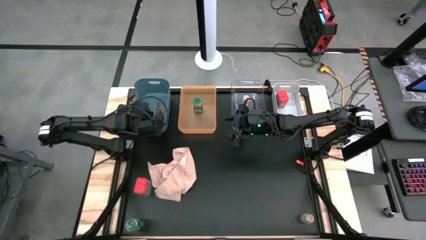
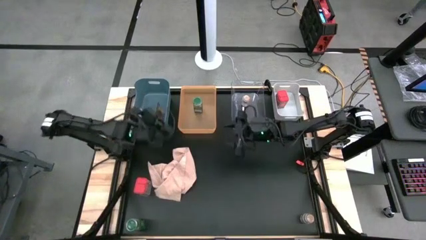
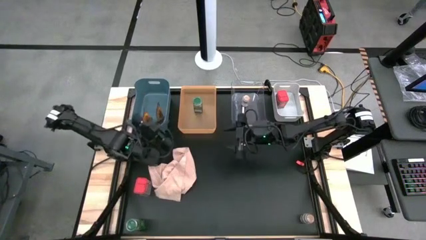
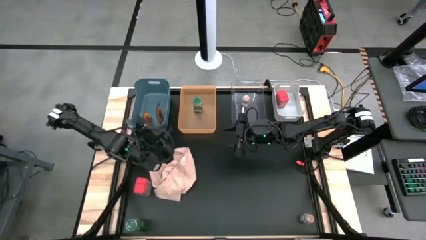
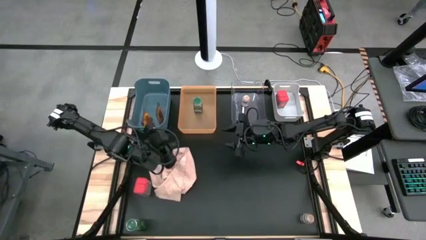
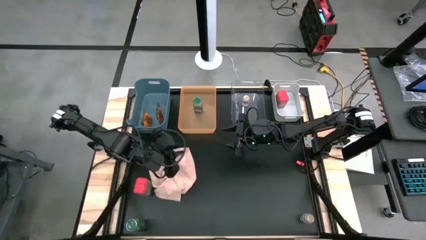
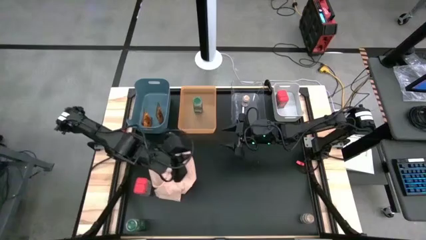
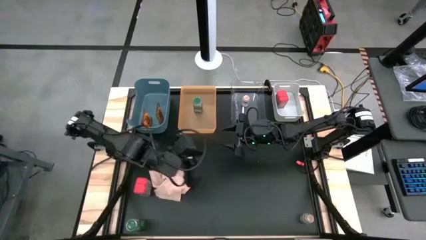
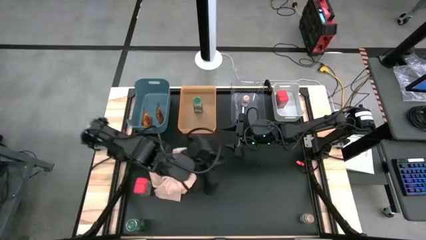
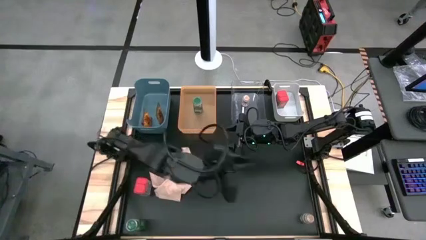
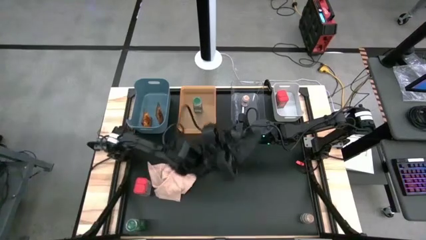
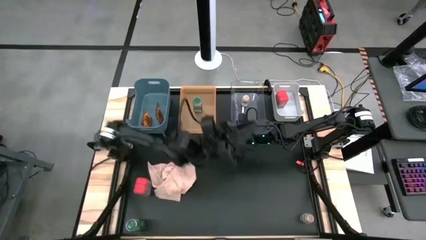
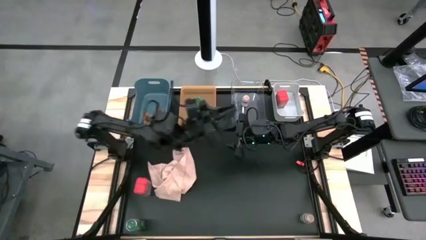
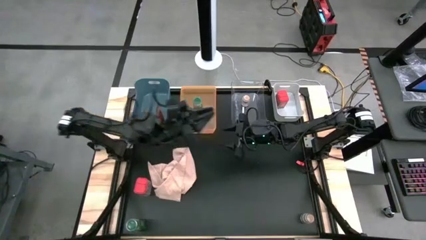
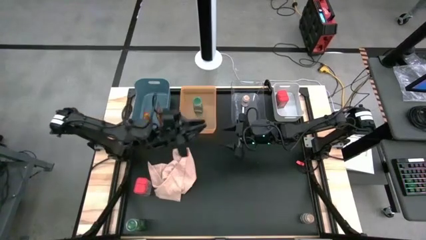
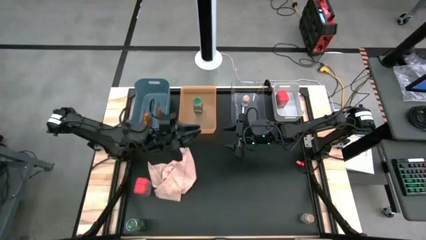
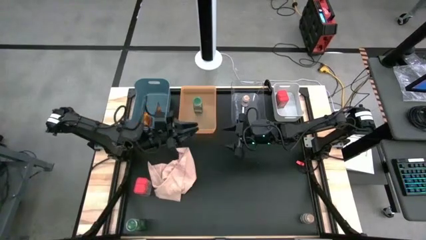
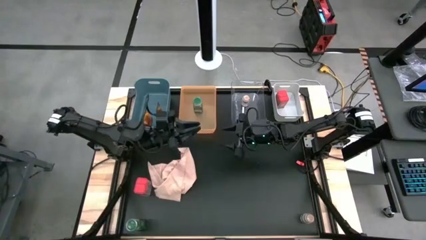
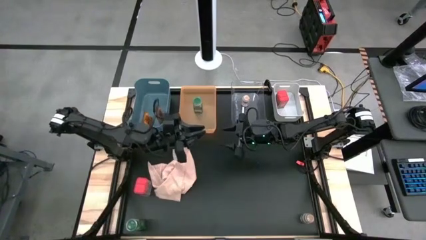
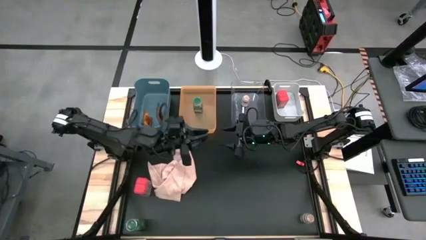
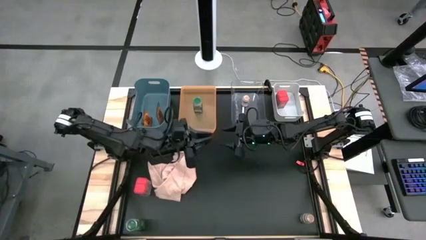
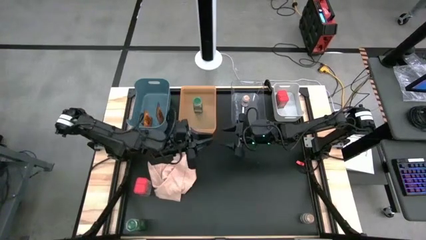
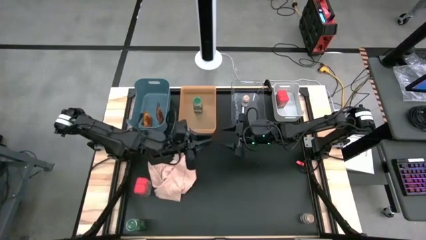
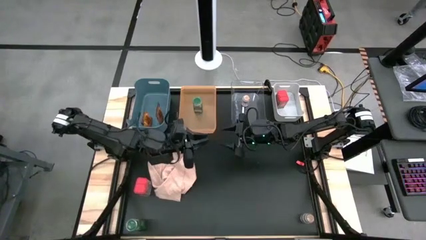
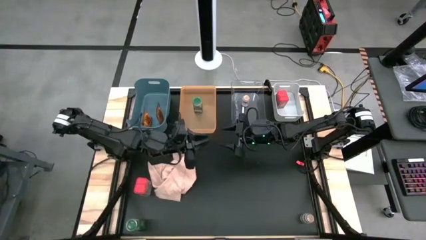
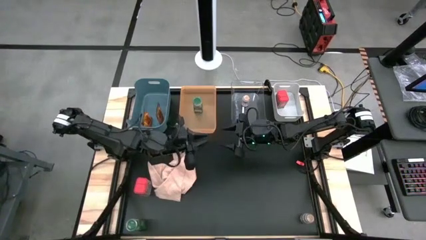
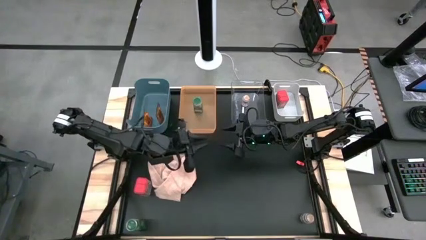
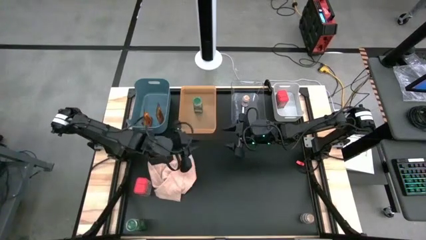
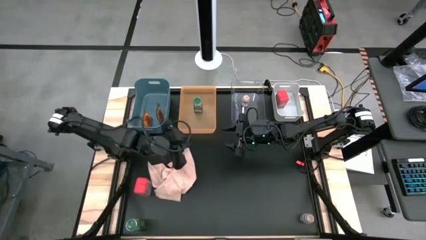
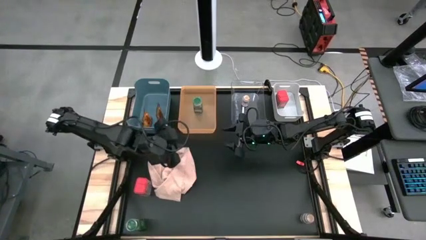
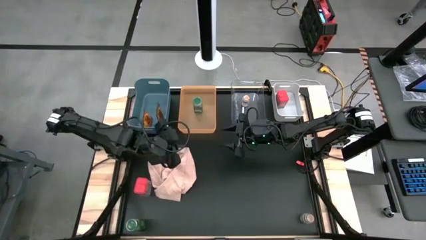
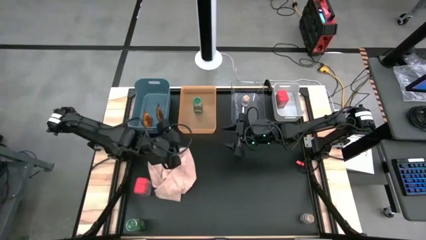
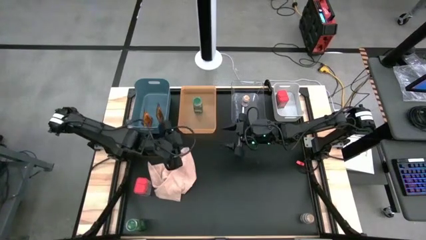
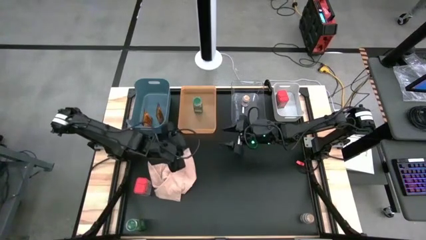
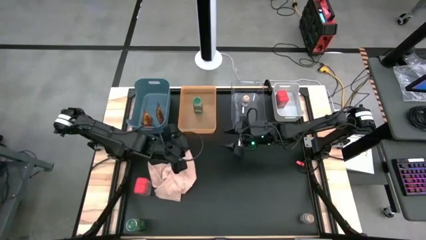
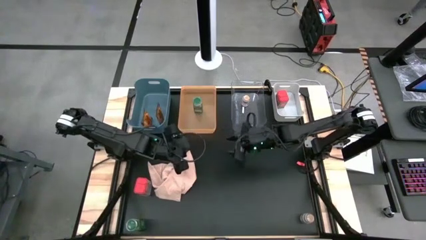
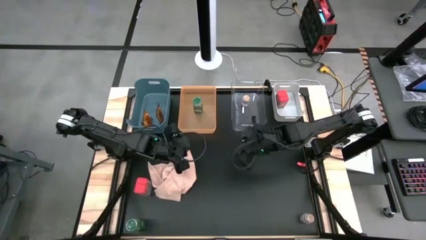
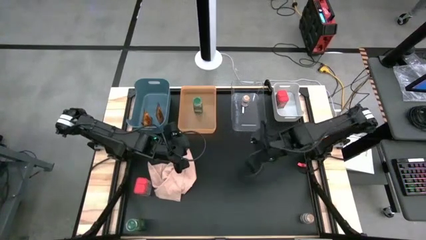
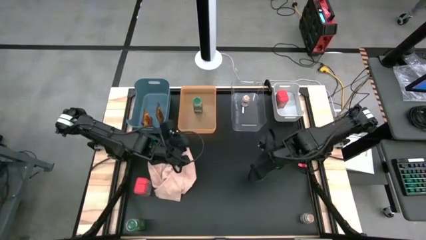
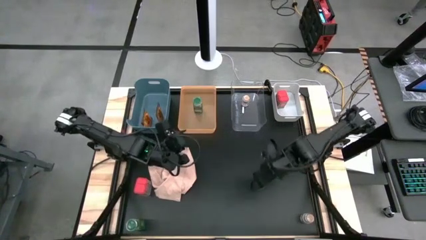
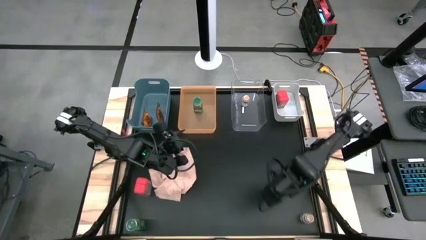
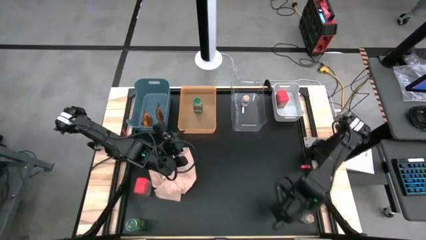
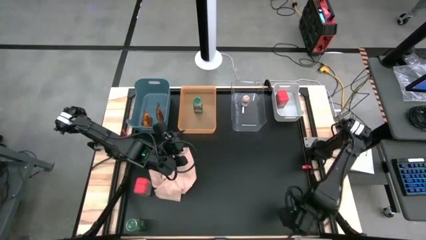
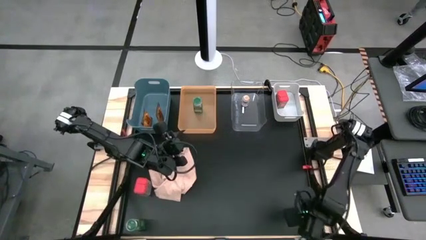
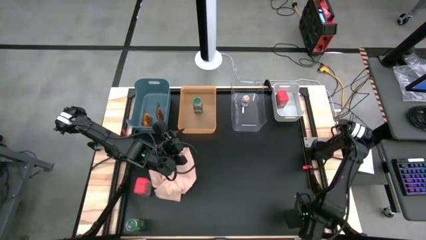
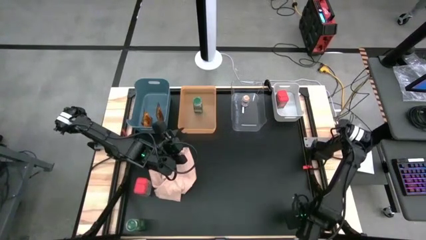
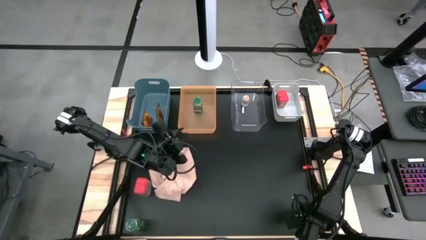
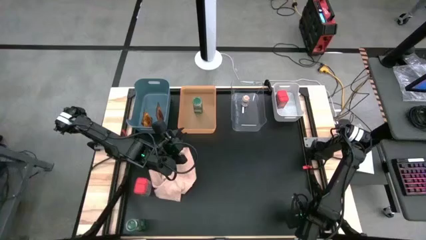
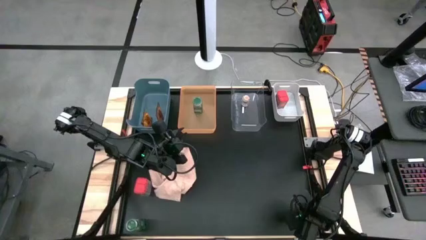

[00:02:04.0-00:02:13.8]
Task: Sort spices by type
Put the brown seasoning bottle into the transparent bin

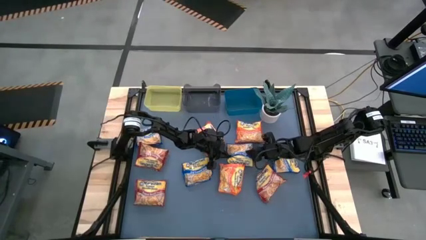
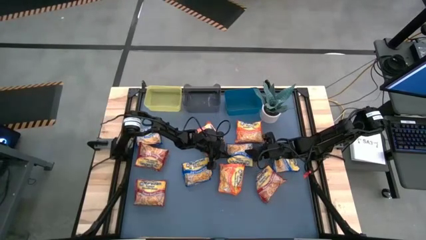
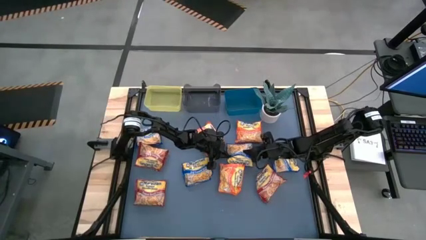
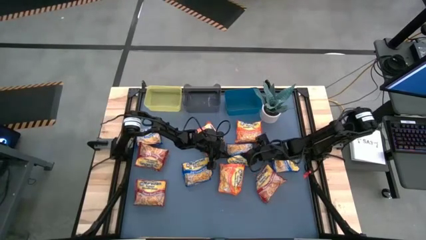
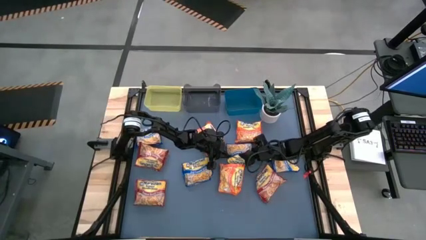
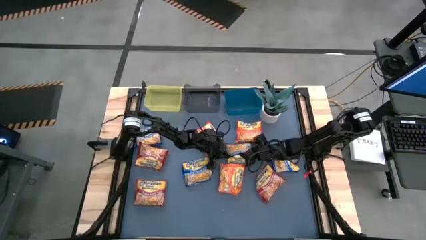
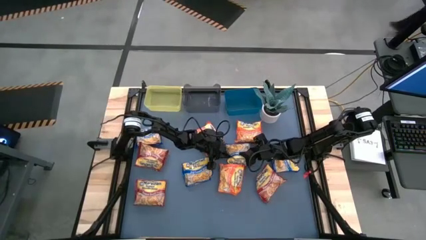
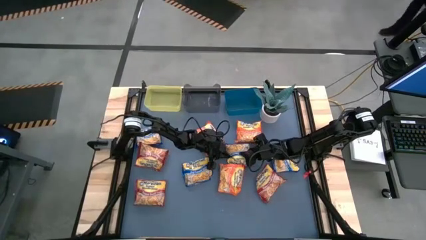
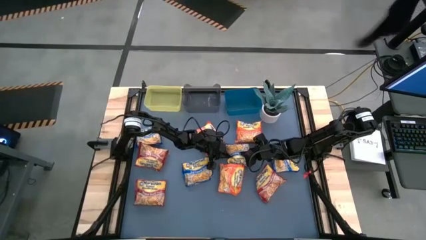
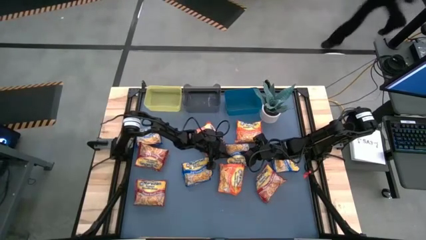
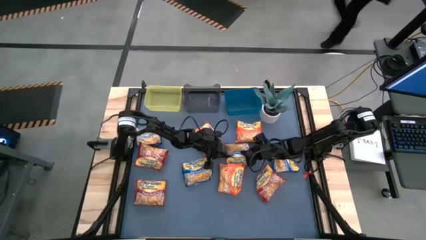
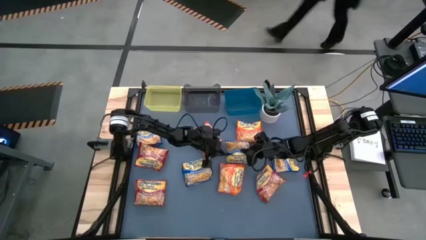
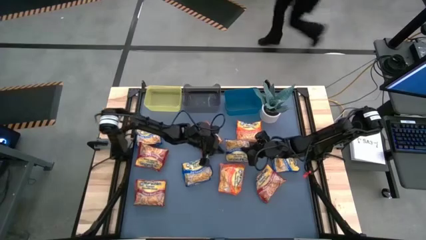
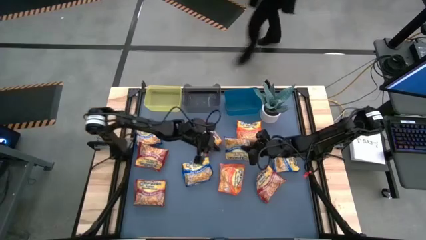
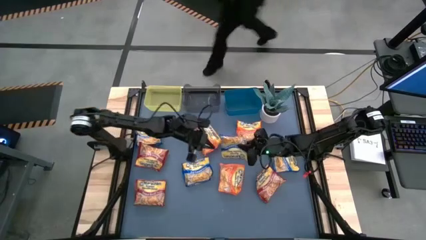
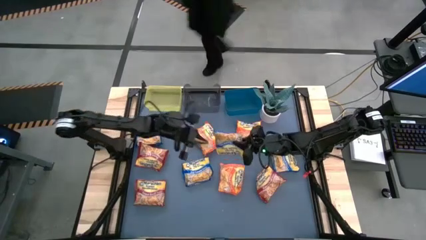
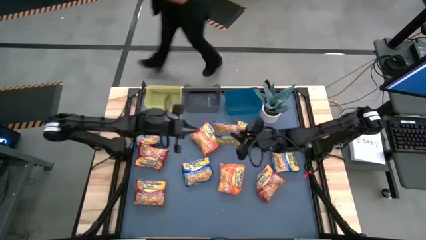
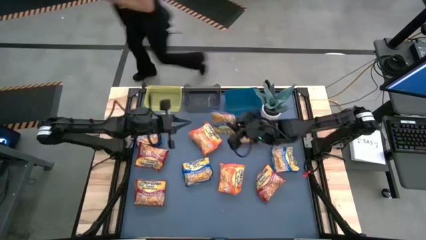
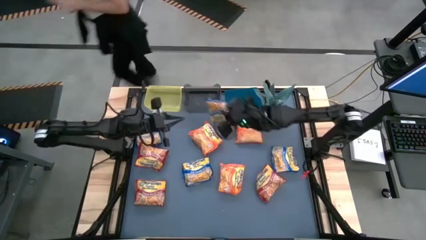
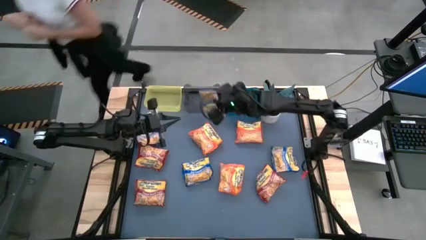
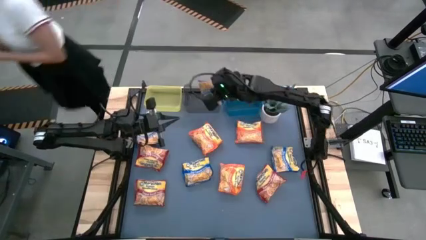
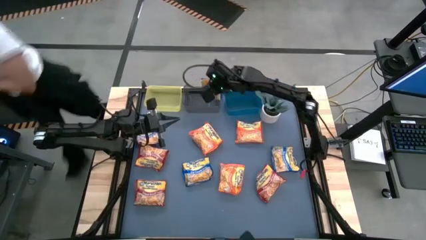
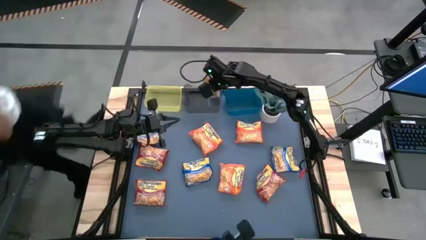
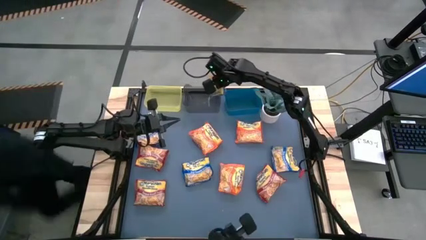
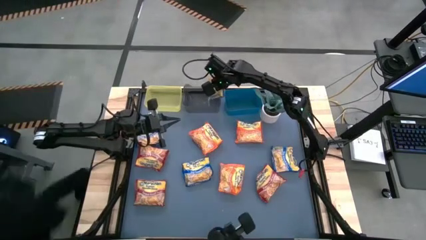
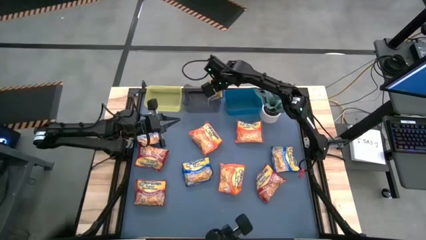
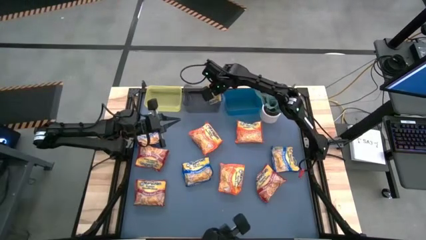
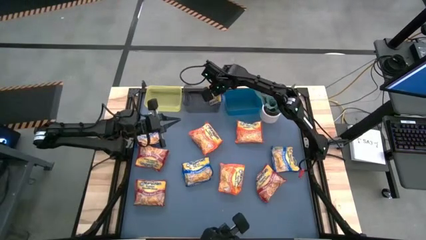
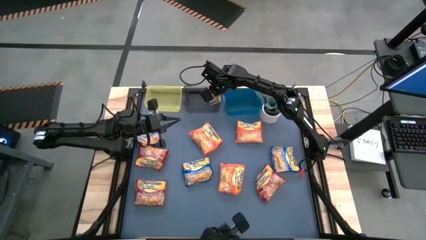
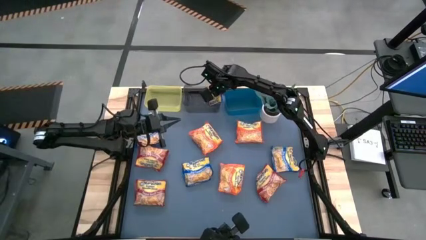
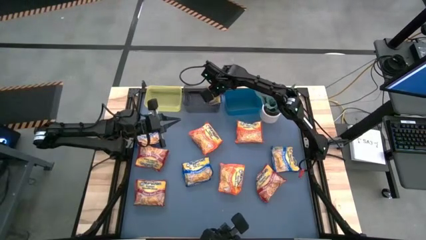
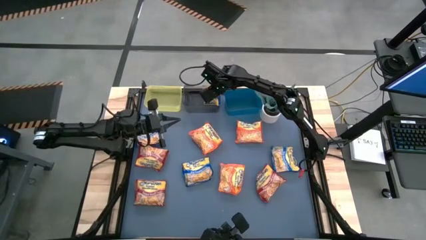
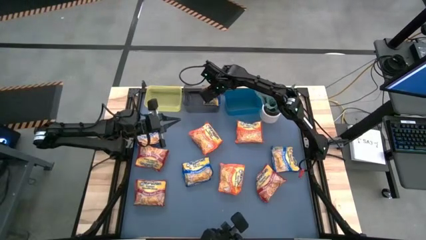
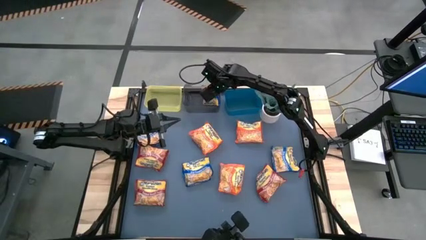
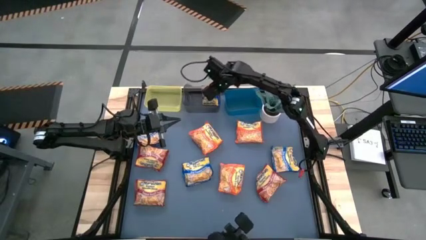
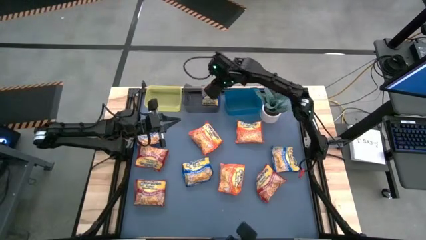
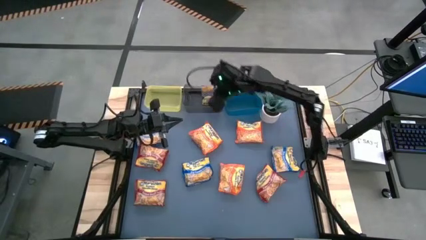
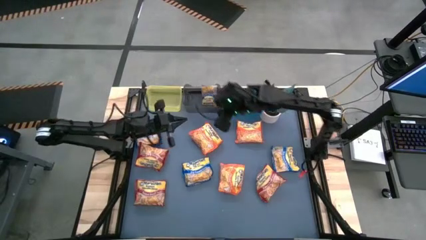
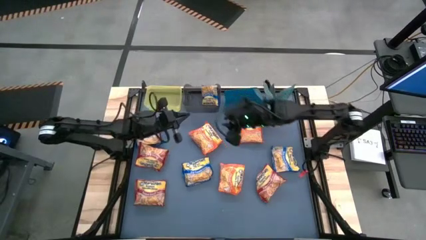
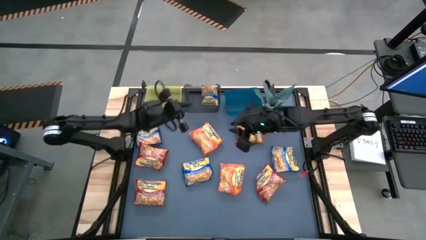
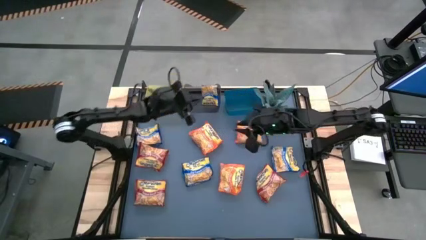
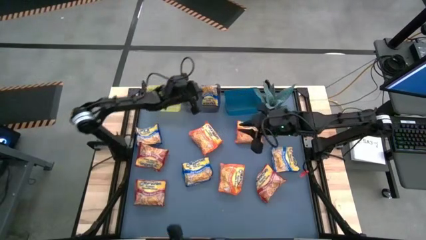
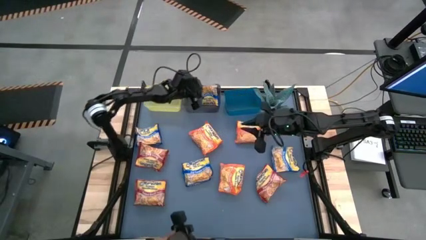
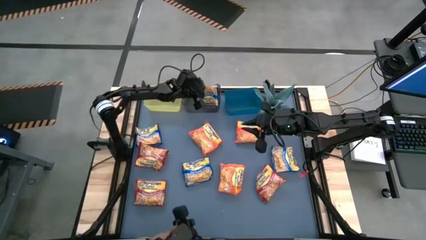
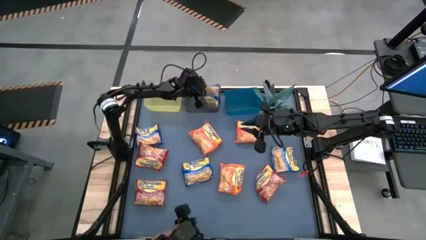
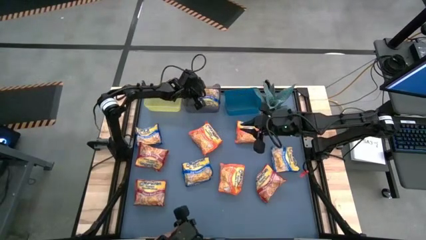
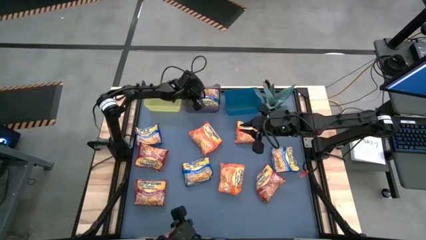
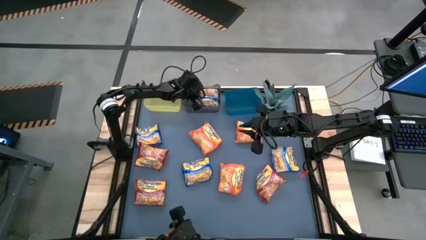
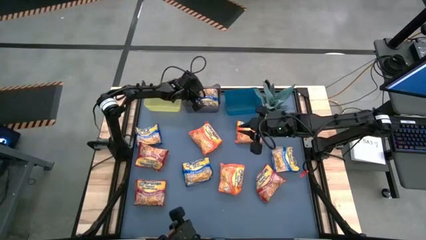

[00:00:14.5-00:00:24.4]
Task: Sort Maruchan noodles
Put the blue noodle pack into the black bin
